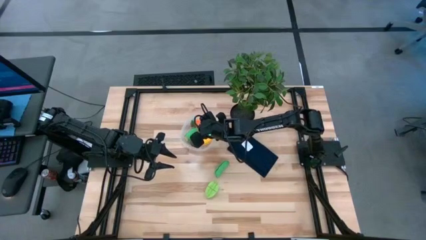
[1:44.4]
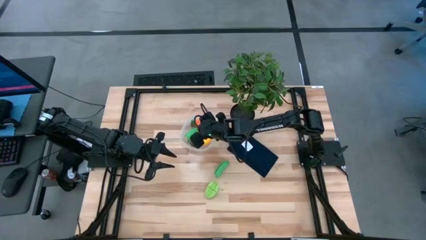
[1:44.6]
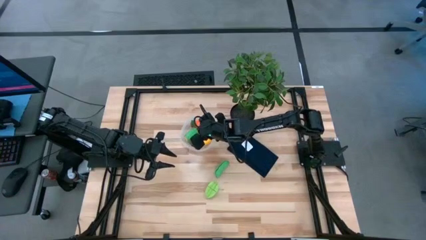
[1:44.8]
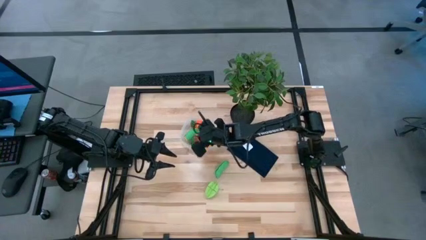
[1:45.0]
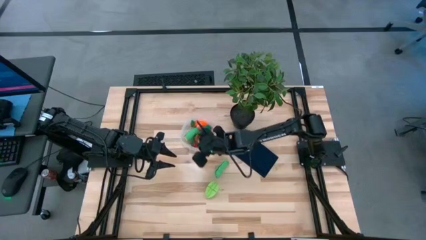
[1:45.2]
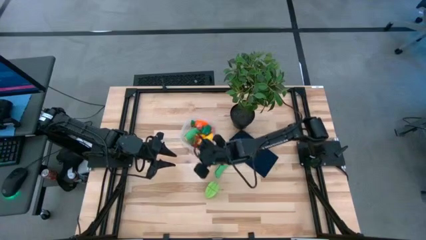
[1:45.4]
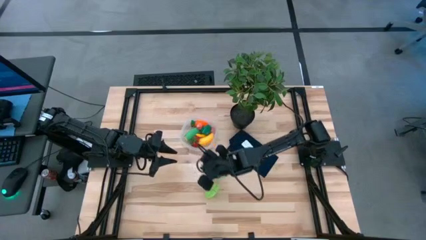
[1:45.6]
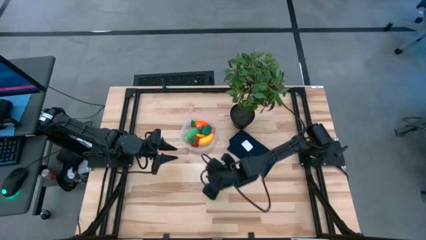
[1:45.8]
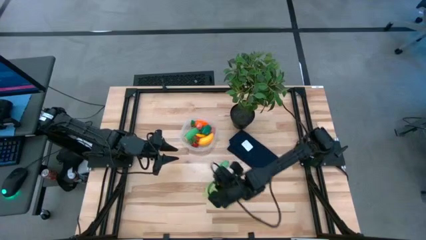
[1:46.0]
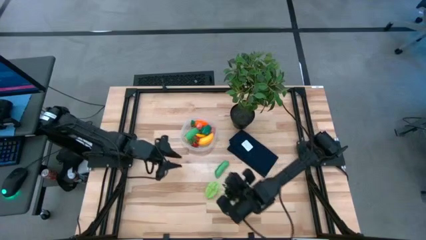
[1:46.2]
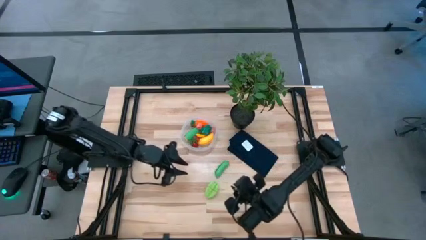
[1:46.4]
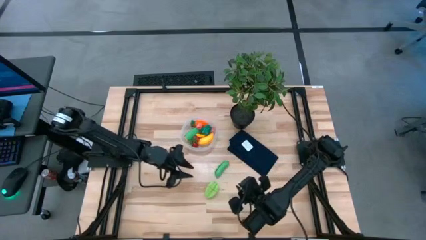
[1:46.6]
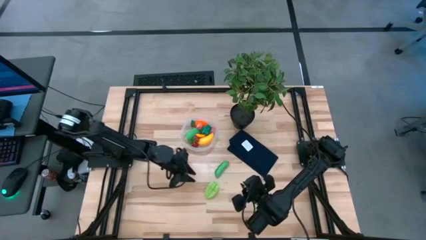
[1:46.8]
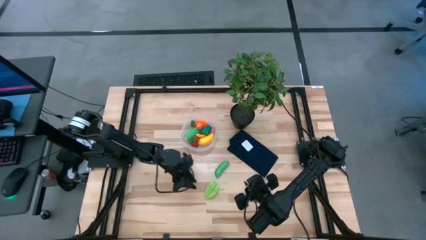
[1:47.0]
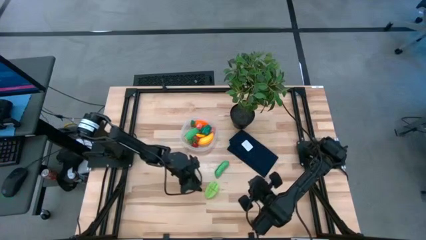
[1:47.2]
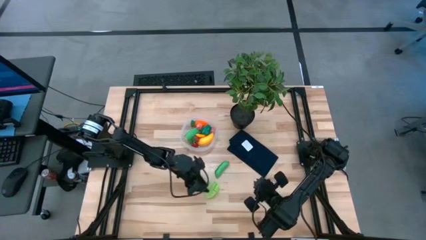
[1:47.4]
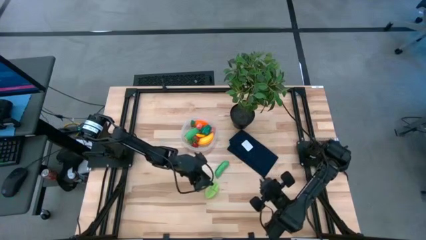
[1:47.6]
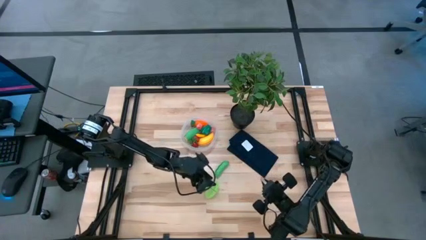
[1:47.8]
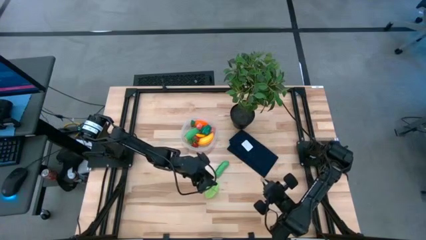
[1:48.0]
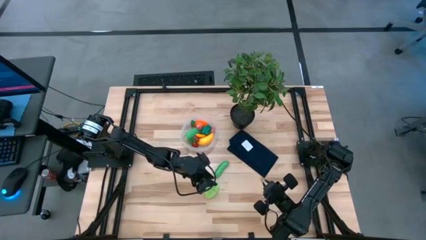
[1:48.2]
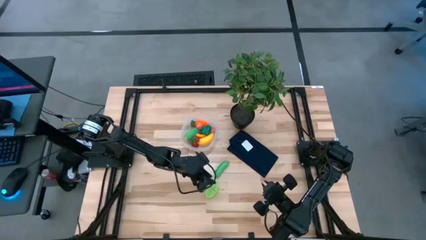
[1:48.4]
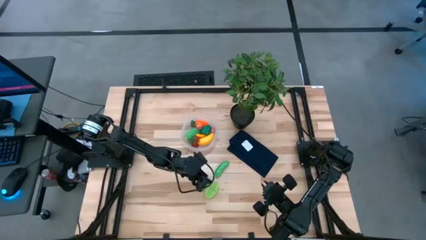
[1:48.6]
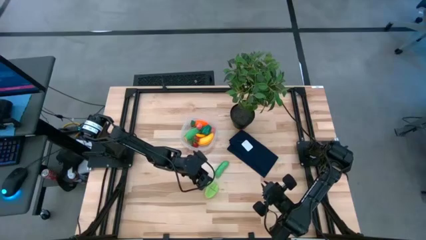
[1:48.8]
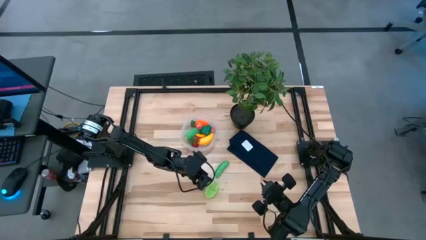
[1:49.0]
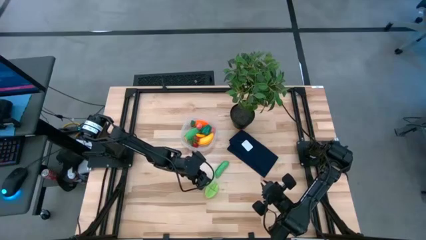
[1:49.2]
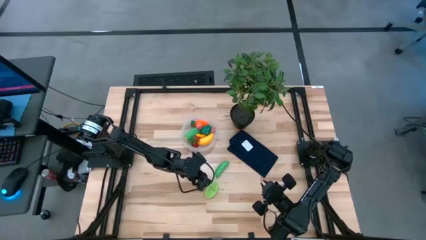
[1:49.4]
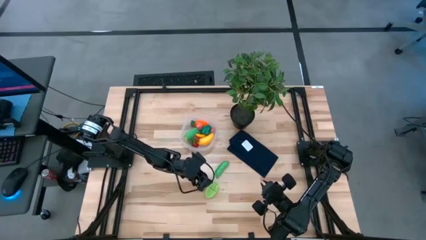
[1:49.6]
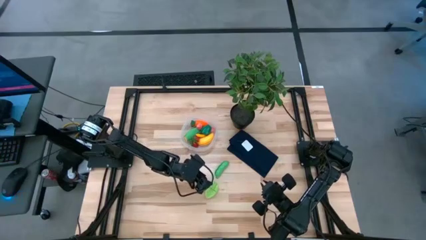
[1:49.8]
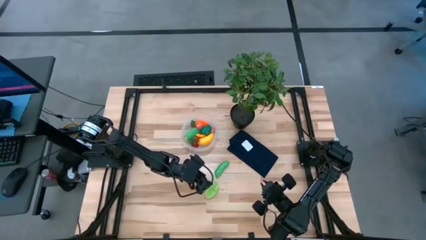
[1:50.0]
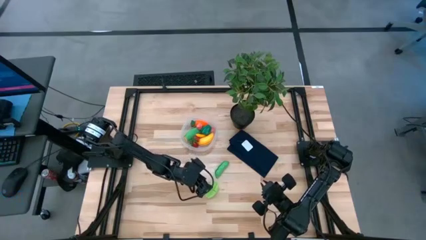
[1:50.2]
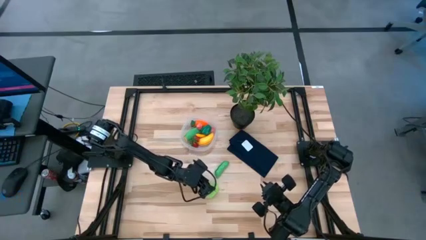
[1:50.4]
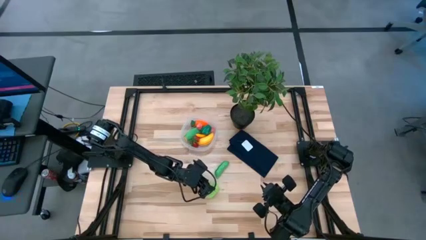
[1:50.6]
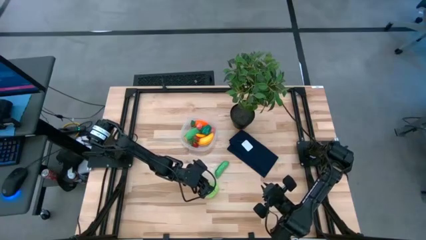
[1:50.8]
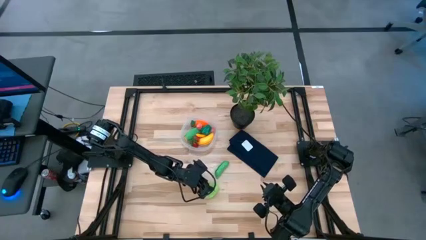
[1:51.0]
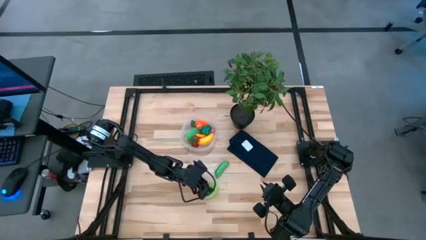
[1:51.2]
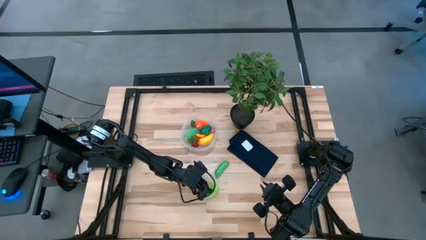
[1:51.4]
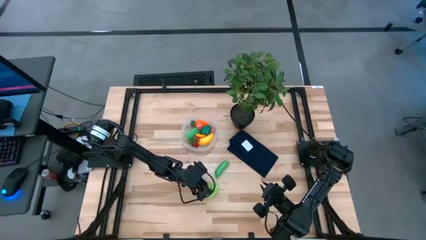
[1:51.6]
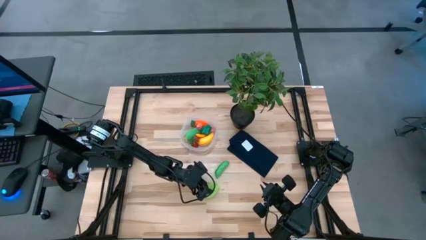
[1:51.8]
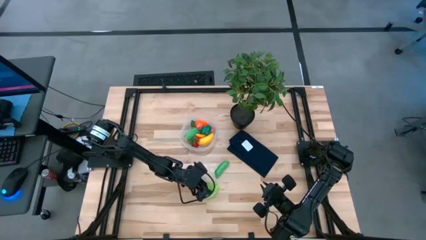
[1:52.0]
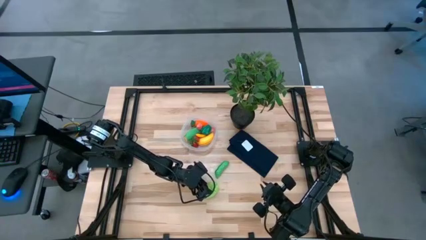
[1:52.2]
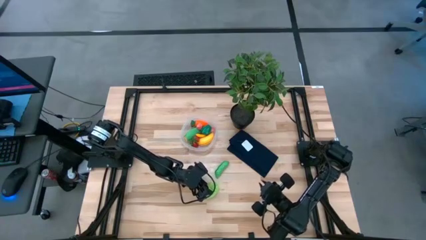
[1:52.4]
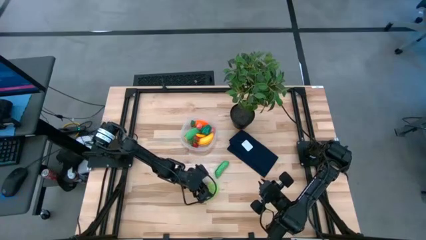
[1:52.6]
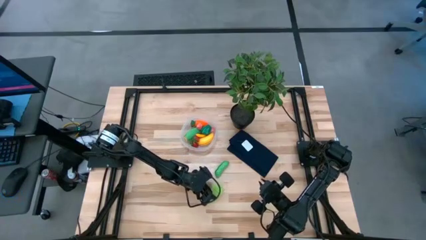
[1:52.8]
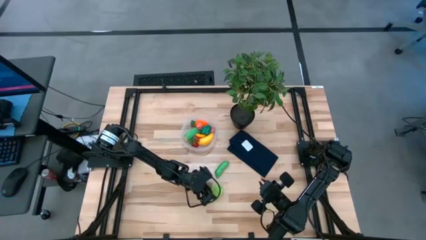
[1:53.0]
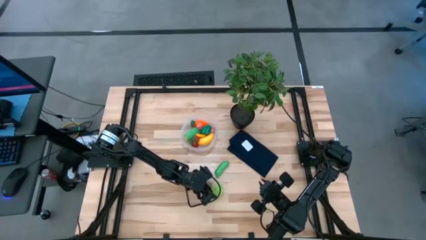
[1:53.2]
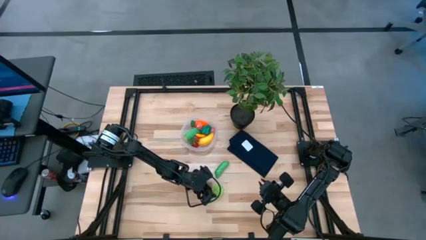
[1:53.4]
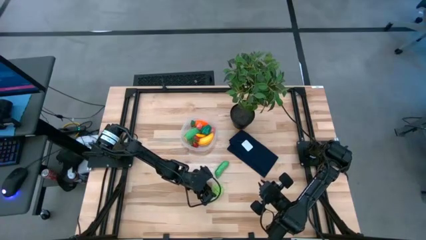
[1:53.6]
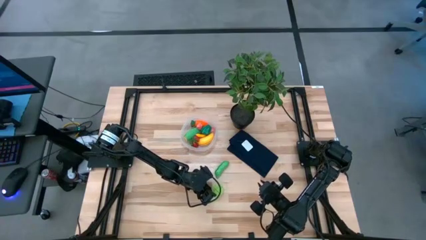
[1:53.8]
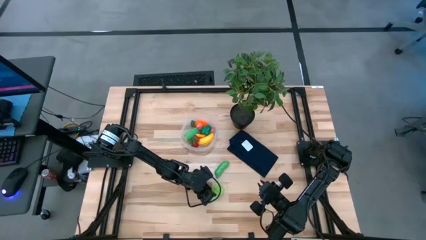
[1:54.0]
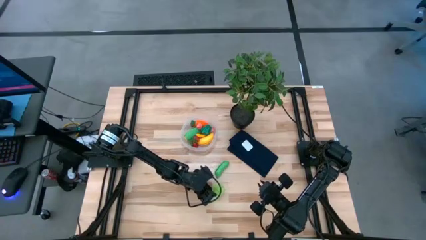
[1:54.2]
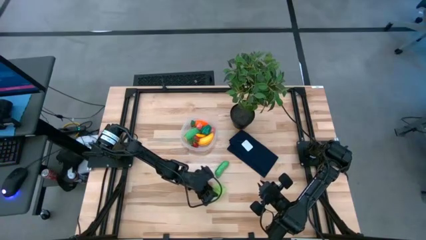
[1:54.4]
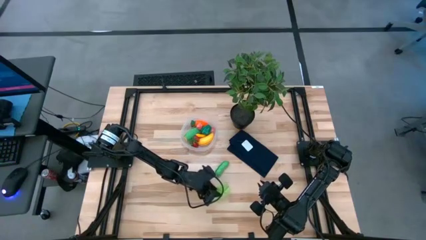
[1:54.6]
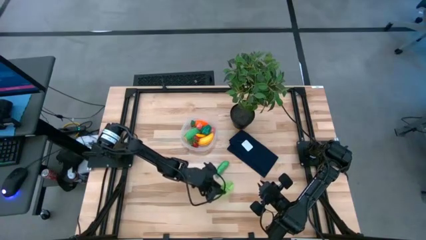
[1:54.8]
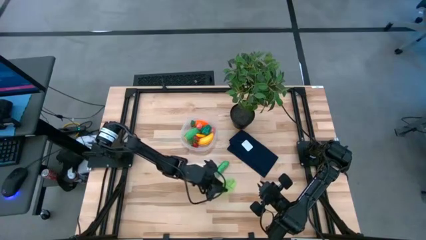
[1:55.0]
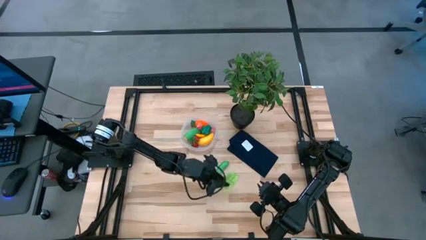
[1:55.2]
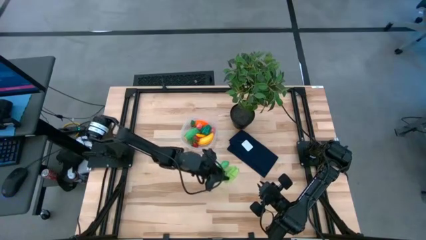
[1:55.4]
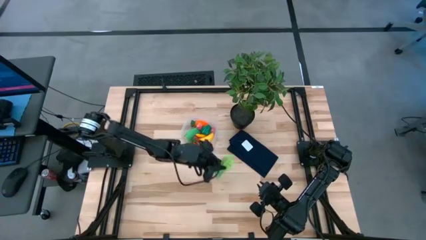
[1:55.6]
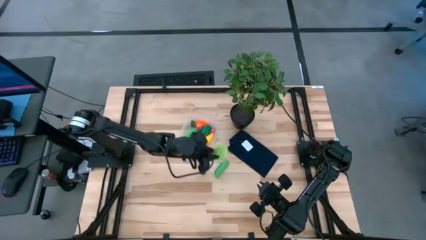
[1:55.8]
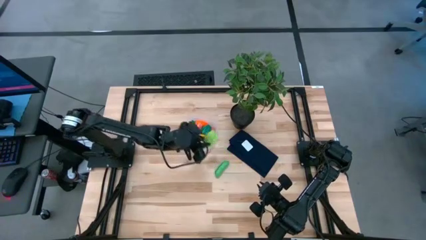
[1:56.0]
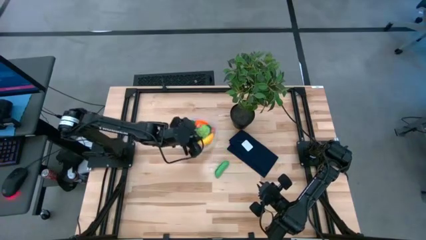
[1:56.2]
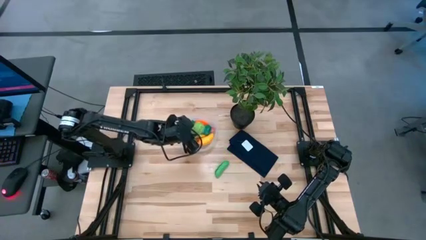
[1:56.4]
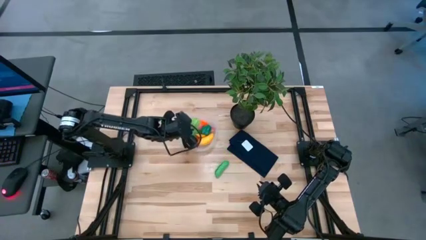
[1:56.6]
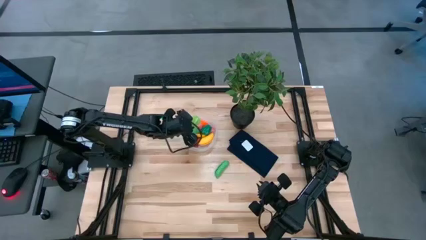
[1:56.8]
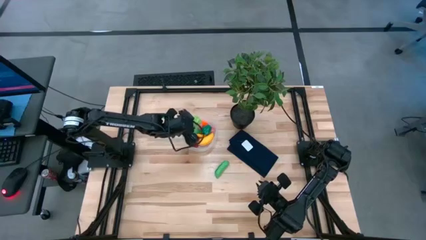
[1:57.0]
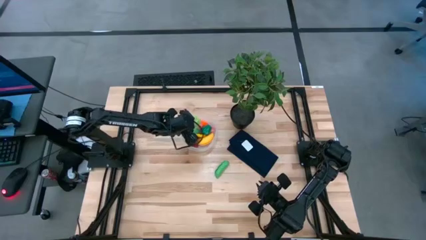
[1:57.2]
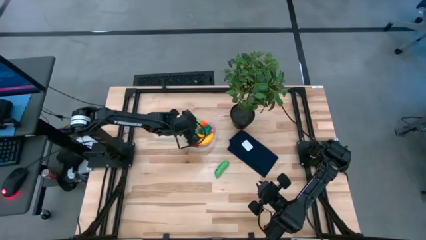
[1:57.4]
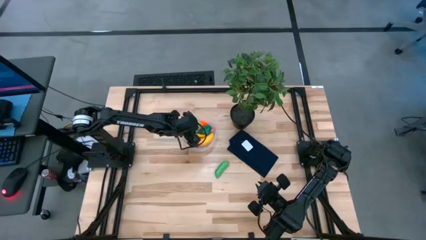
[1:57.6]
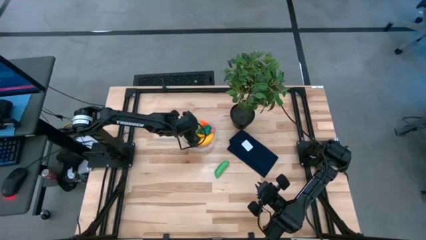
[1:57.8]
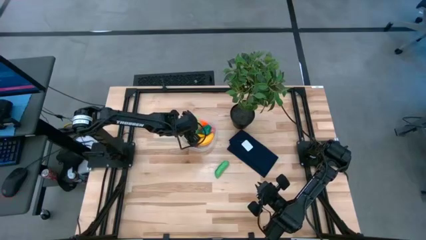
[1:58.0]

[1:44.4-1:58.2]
Task: Pick and placing Produce into tupperware
Put the green star fruit into the transparent bin

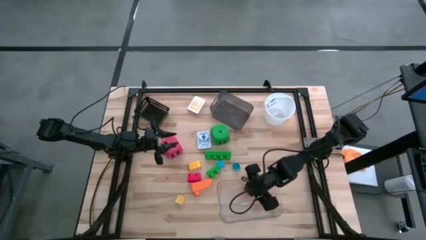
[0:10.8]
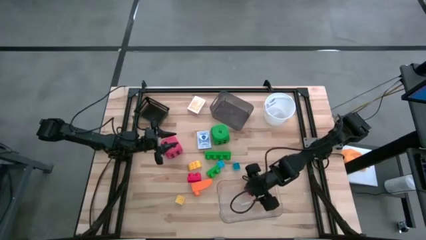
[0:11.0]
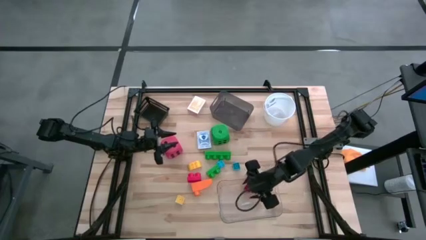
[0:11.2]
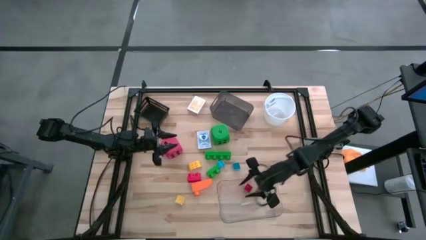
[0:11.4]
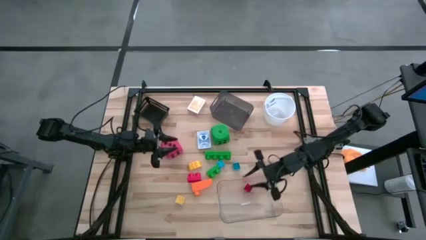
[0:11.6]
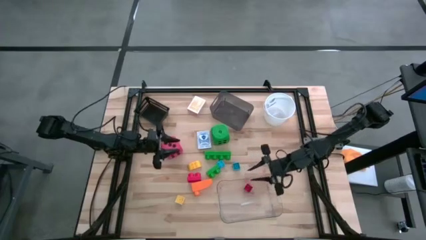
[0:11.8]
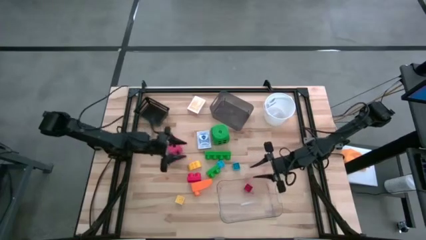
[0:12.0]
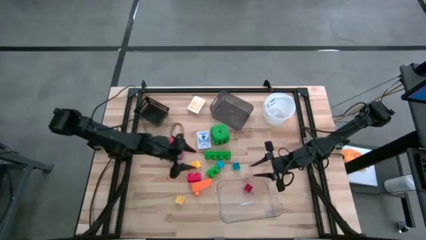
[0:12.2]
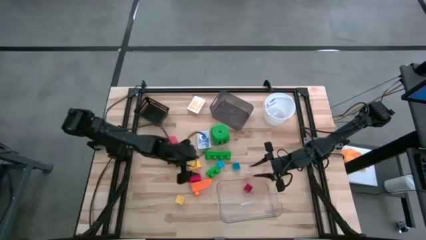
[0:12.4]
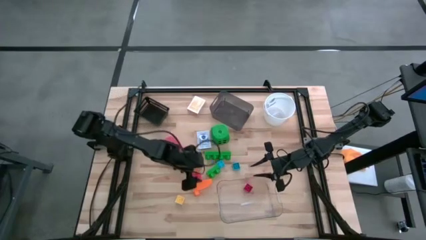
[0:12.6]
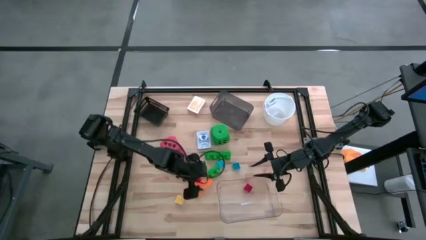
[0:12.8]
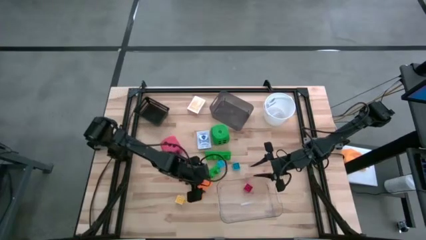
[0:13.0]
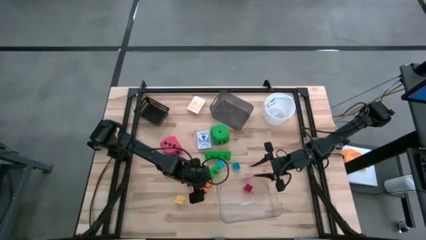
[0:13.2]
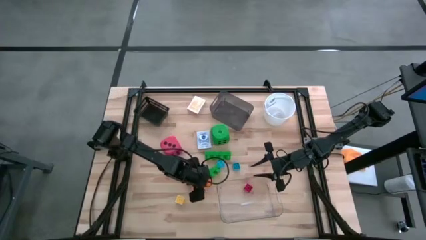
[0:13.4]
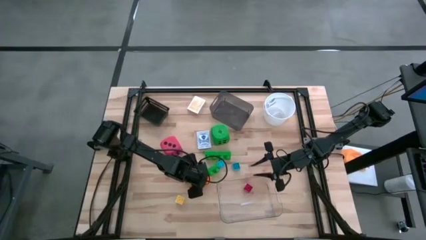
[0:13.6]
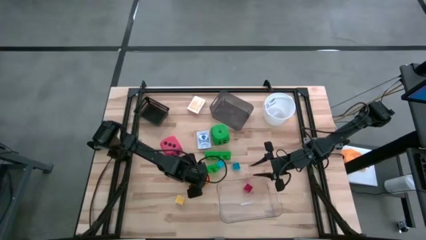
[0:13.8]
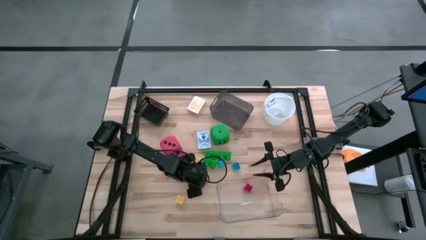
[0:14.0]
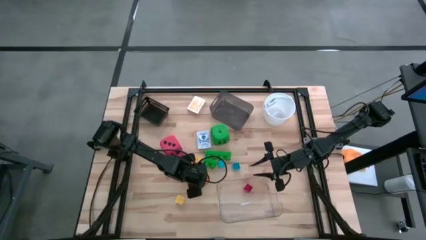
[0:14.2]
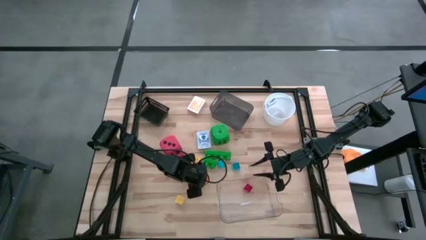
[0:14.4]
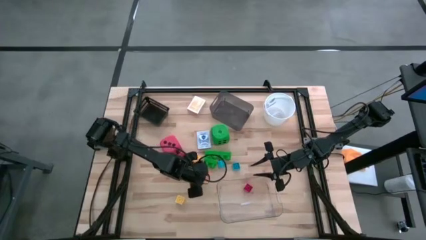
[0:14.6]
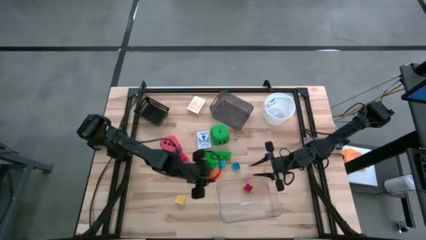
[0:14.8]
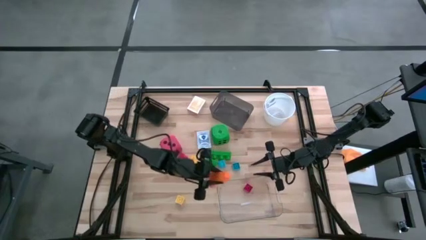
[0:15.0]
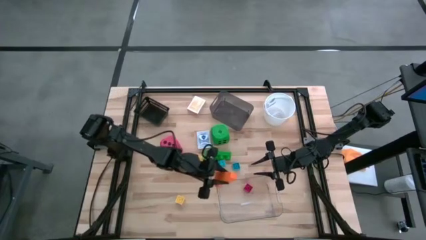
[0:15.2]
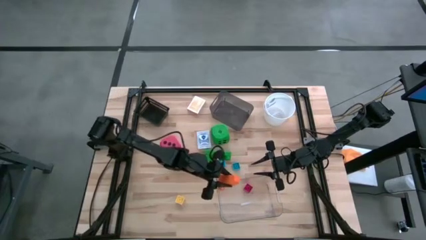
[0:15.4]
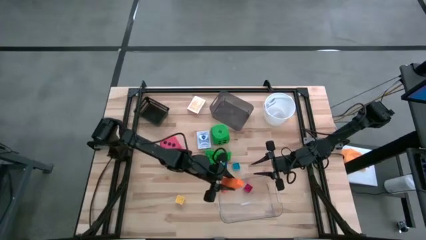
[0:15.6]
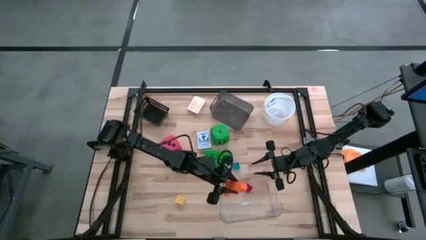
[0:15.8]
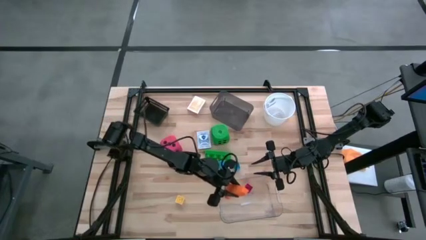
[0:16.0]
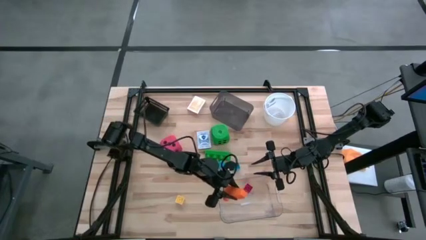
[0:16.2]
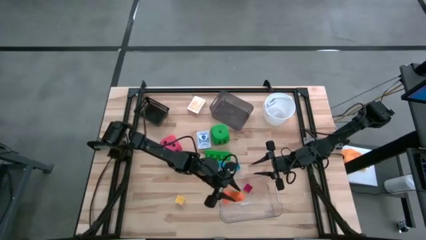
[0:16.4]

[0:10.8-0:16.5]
Task: Pick & Place Toys
Put the orange game piece into the bottom transparent bin
